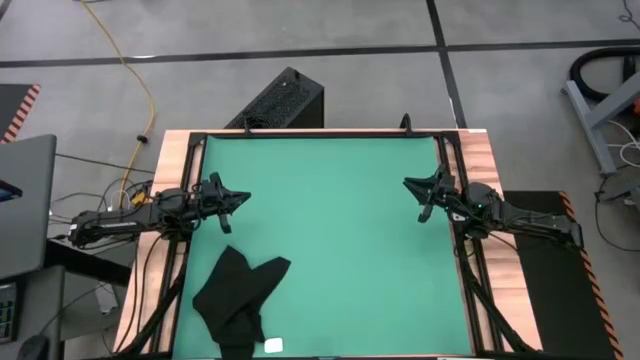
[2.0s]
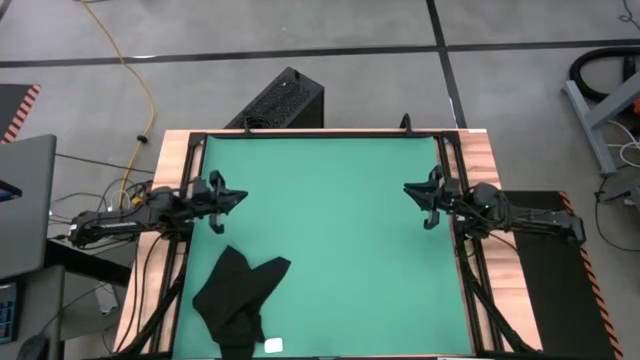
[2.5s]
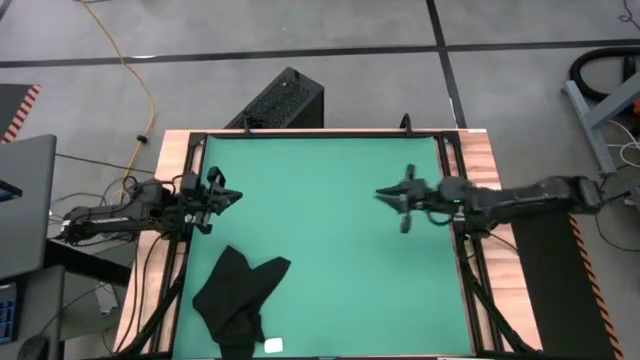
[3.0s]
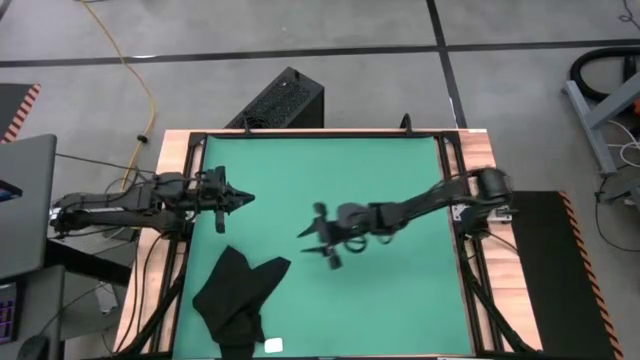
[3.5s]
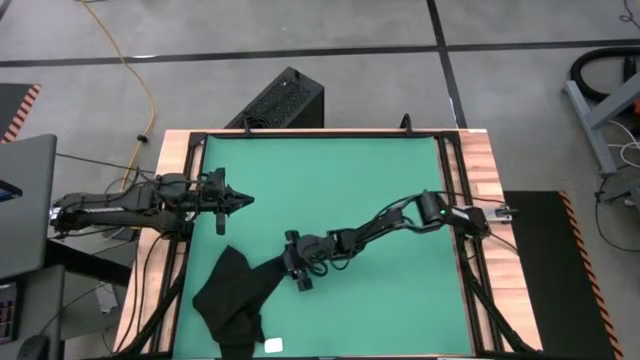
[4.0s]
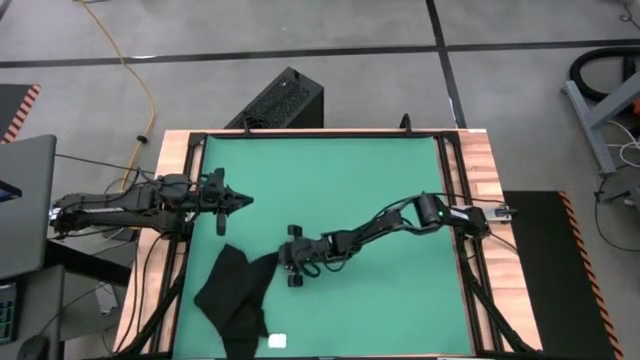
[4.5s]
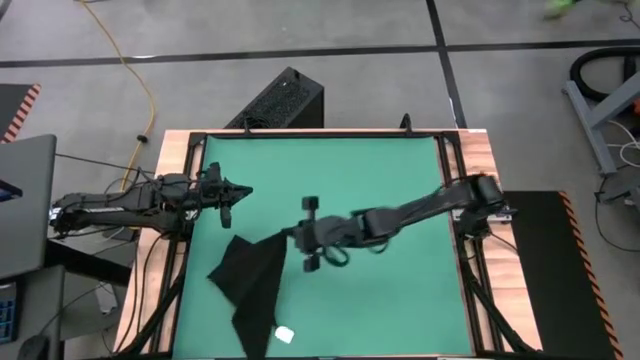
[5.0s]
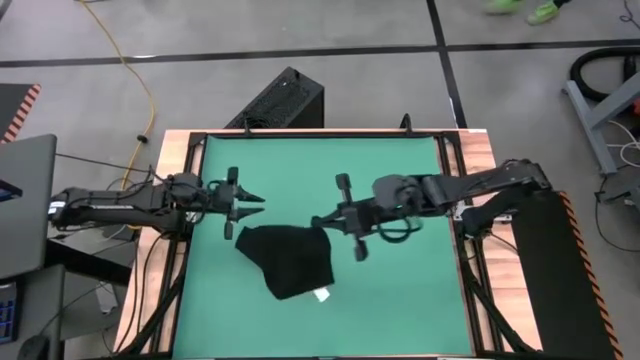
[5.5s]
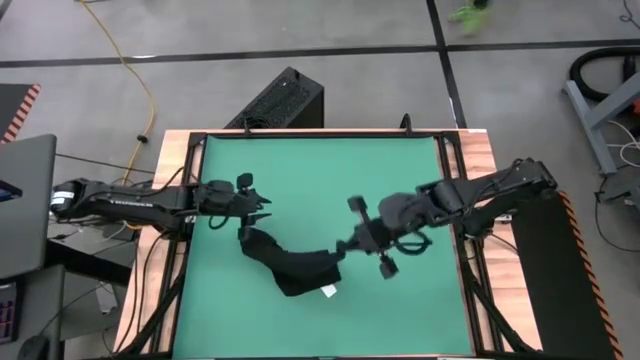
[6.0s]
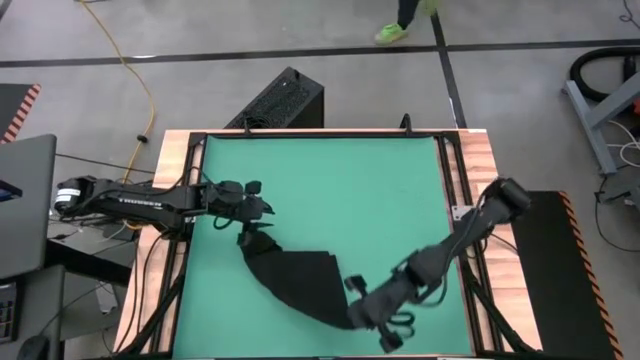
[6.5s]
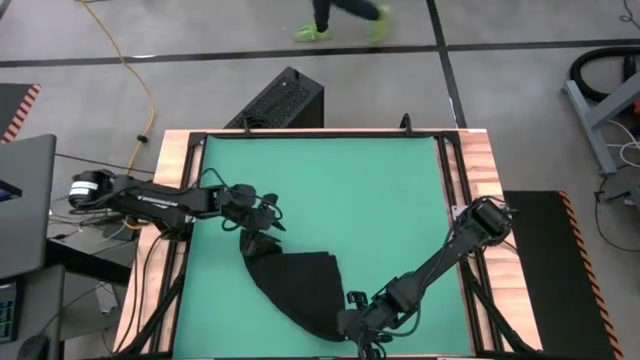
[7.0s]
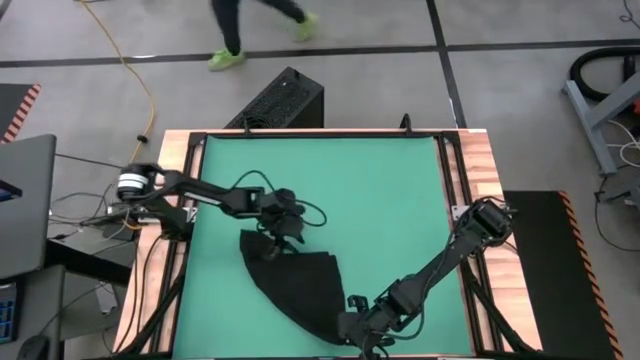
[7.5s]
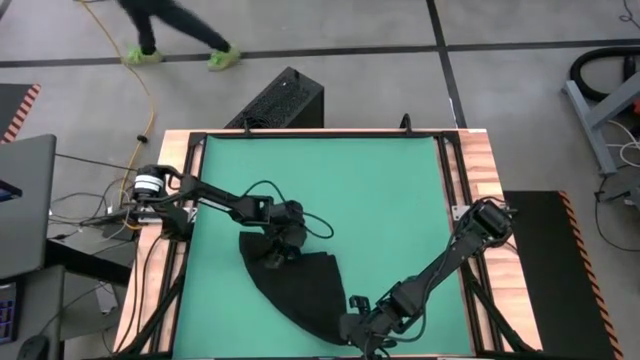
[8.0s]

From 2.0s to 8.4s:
Task: Roll towel
Roll the black towel

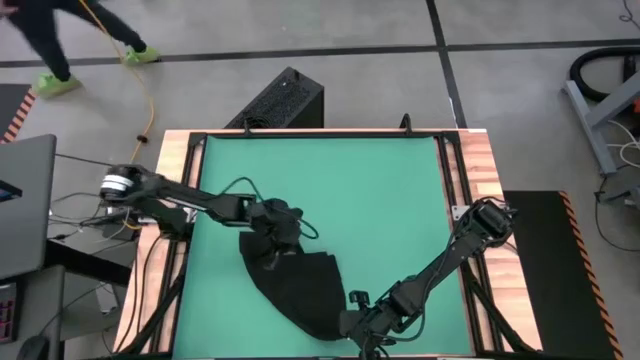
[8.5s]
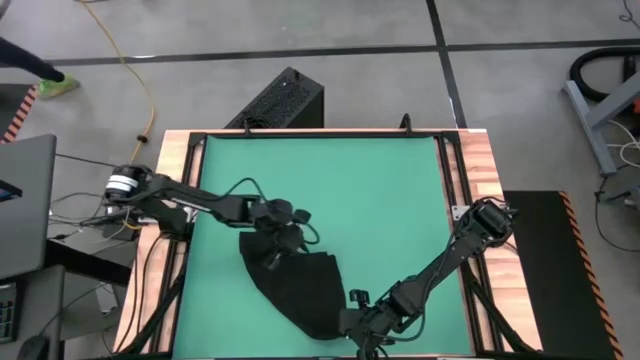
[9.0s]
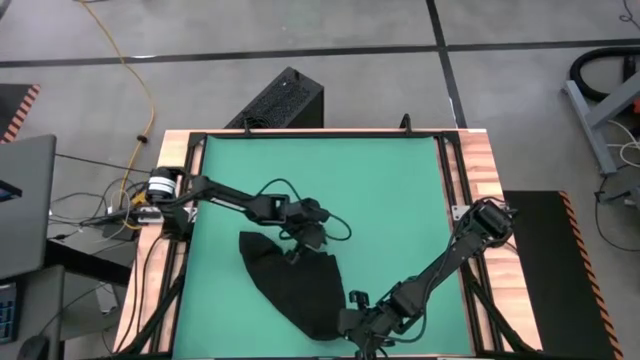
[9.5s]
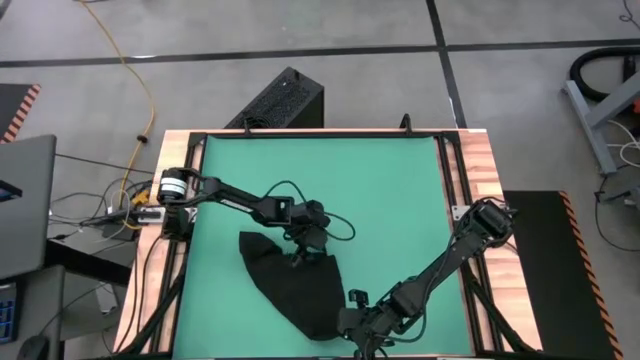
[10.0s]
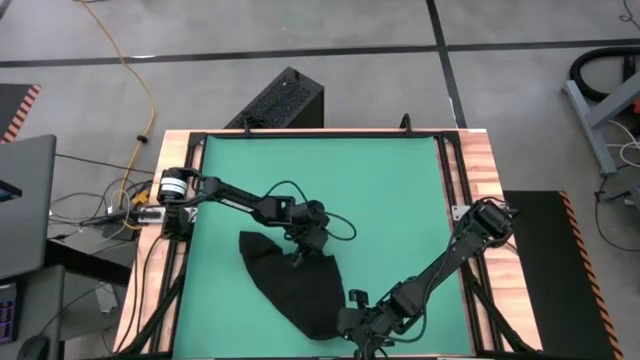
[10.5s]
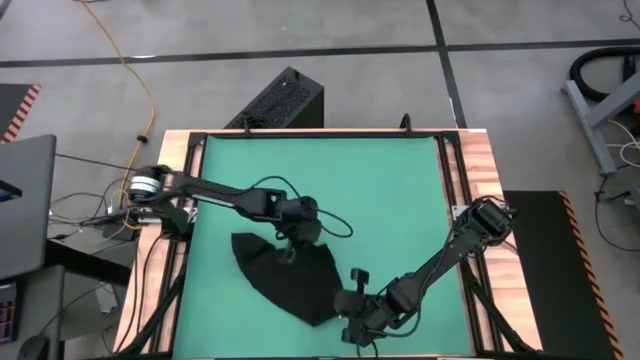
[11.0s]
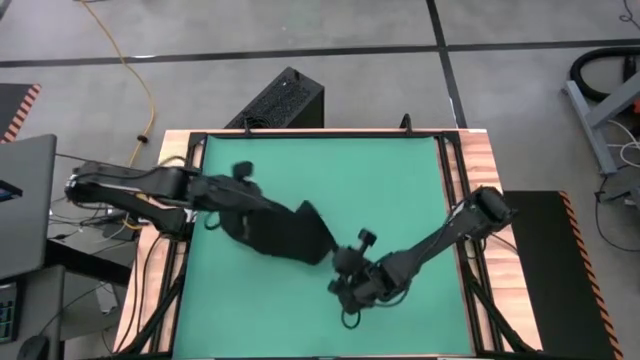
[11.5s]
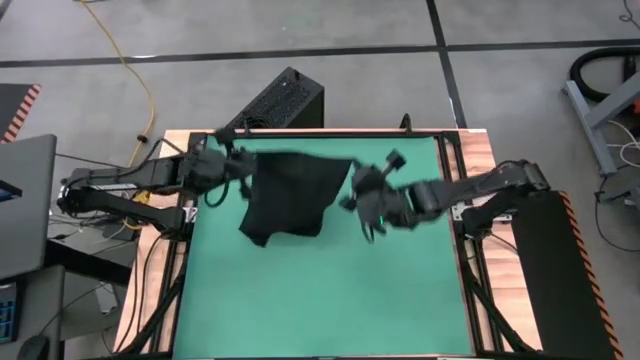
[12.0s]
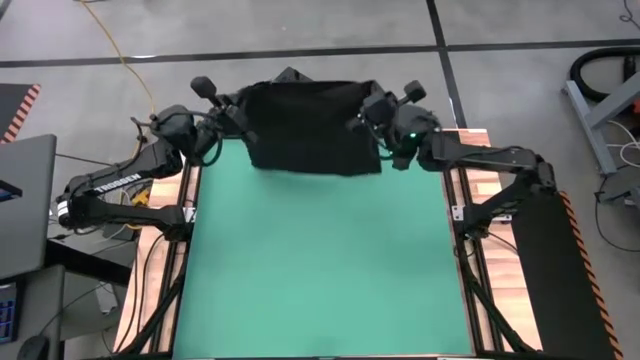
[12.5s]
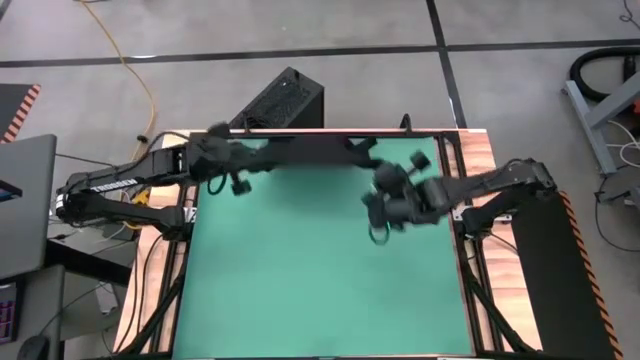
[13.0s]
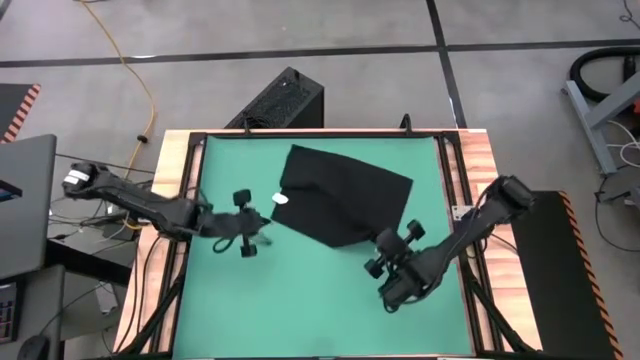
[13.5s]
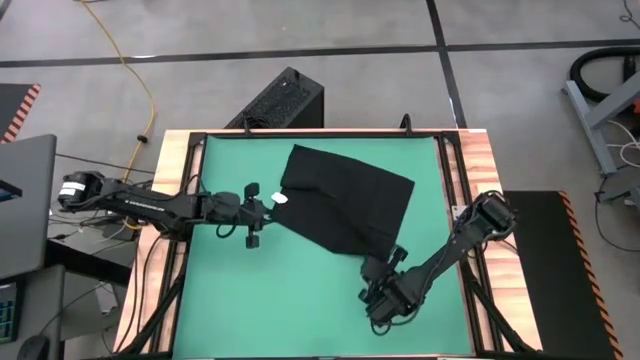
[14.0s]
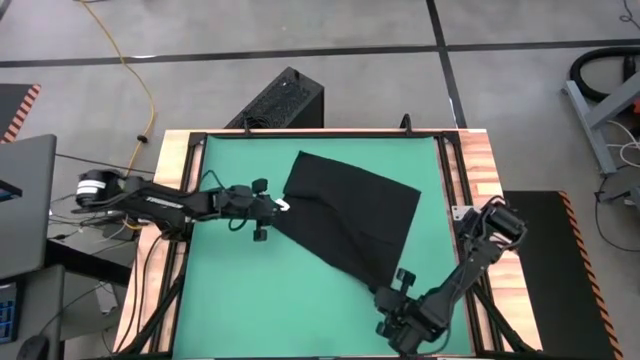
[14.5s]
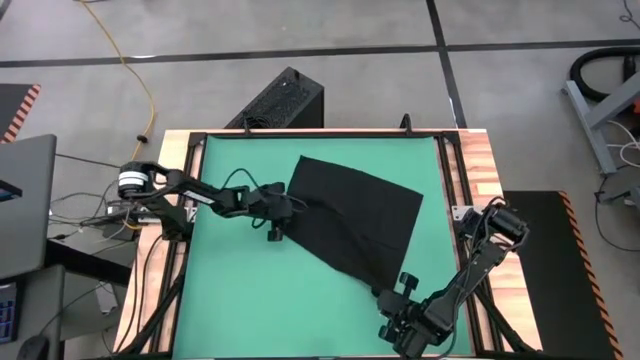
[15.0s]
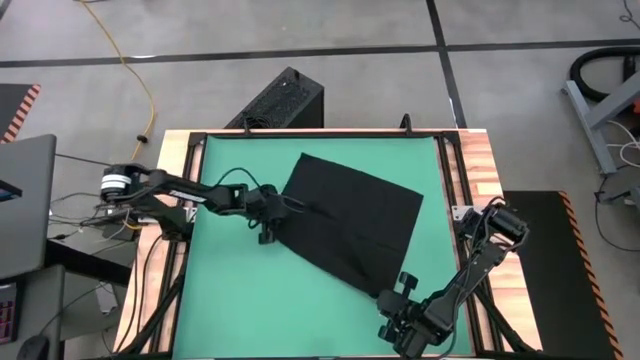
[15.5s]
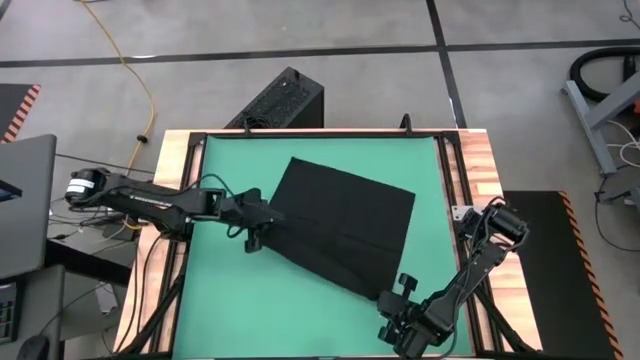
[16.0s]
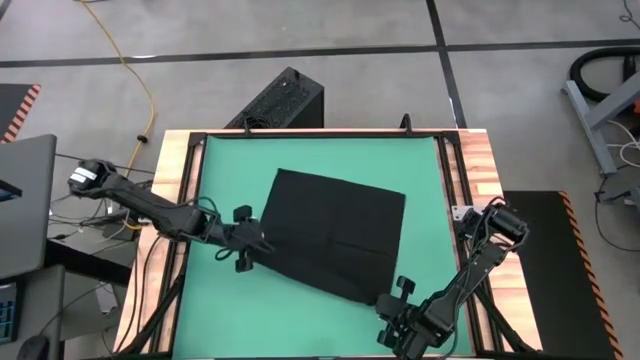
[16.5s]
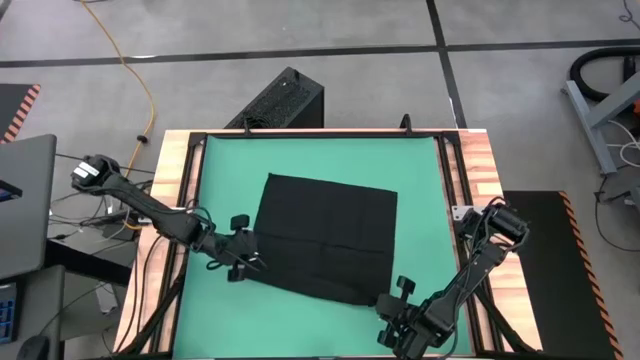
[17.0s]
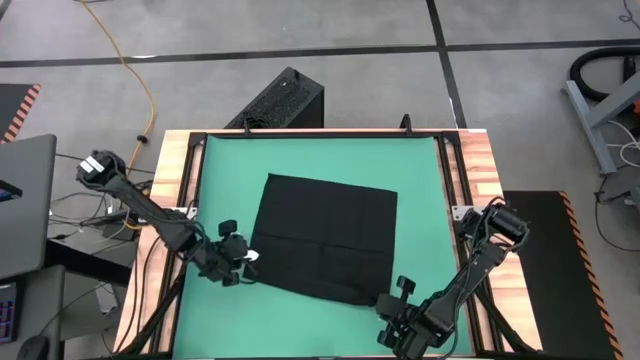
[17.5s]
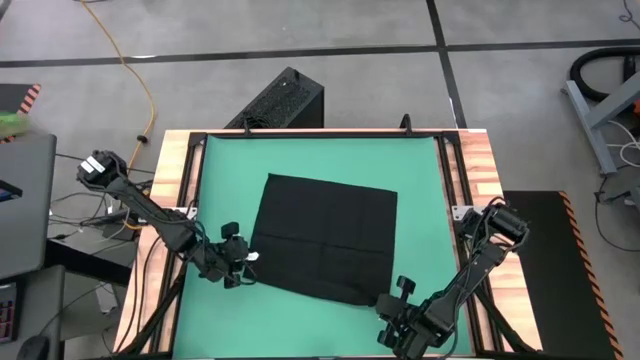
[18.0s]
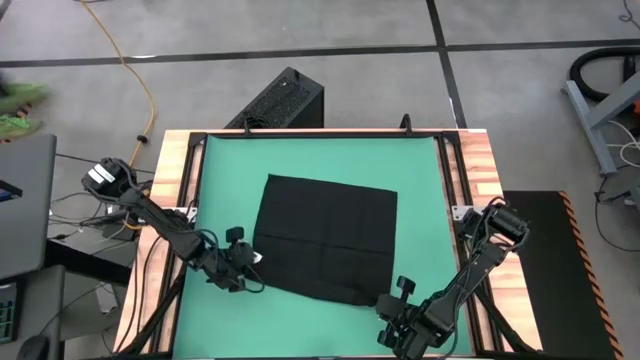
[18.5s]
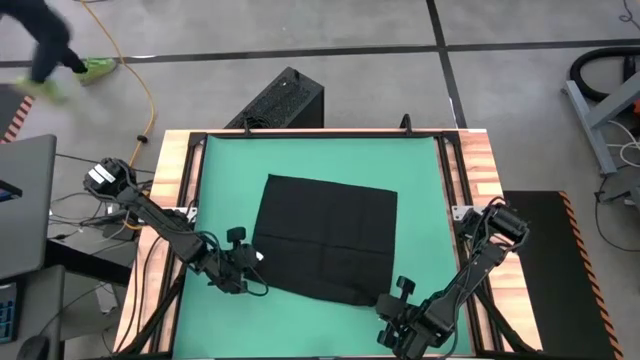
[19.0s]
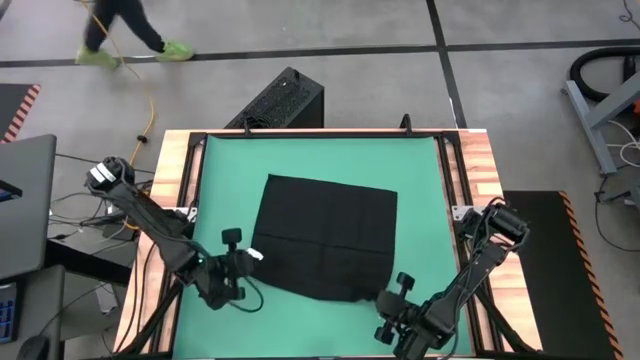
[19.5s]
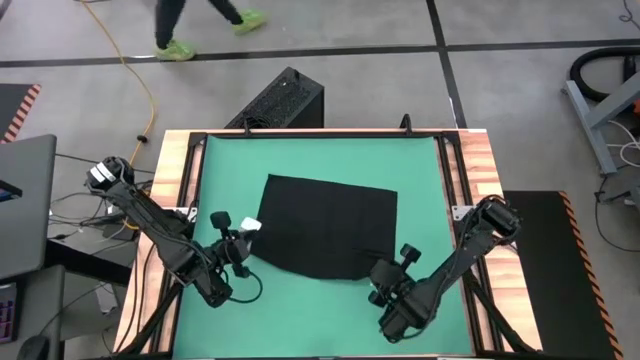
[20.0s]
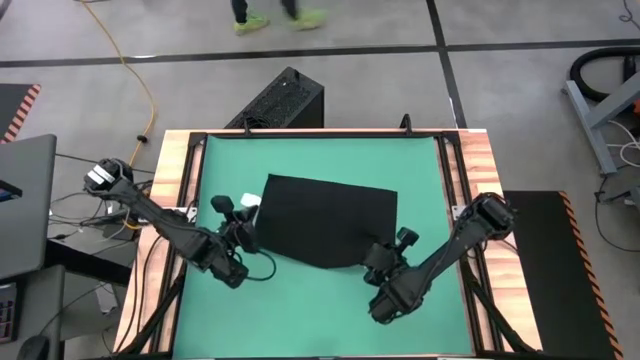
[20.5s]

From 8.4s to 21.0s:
Roll the black towel

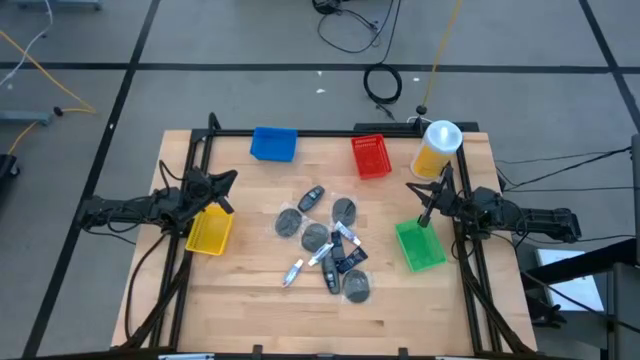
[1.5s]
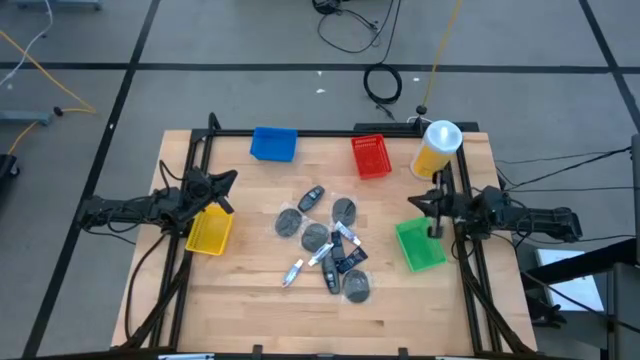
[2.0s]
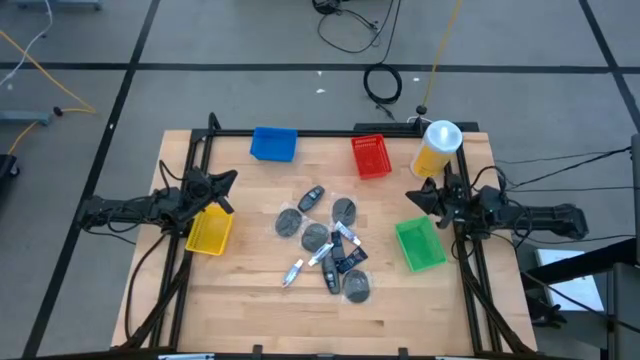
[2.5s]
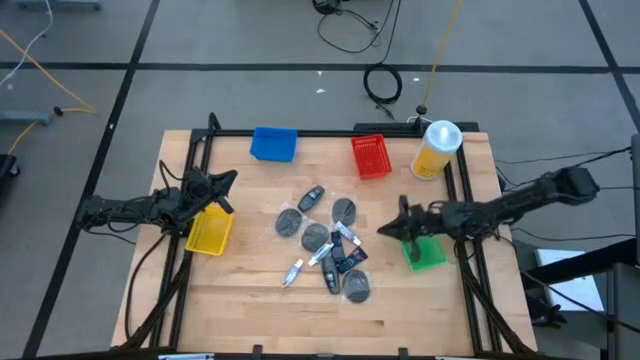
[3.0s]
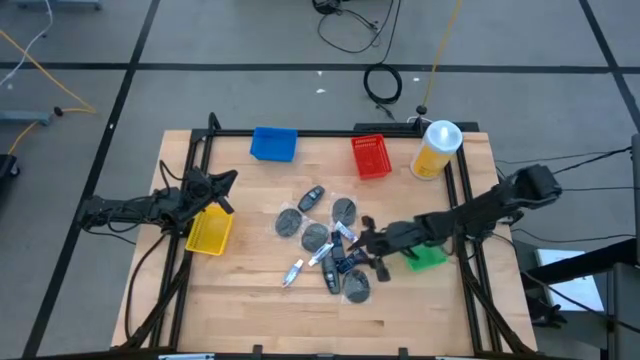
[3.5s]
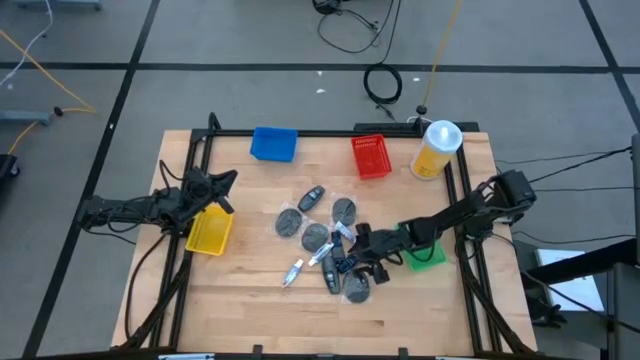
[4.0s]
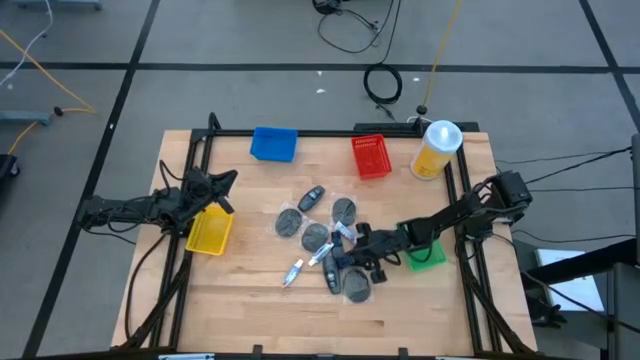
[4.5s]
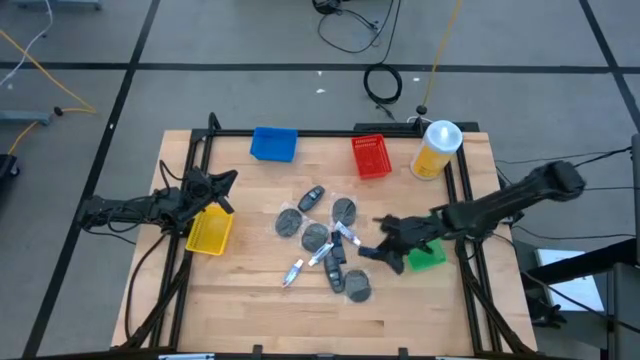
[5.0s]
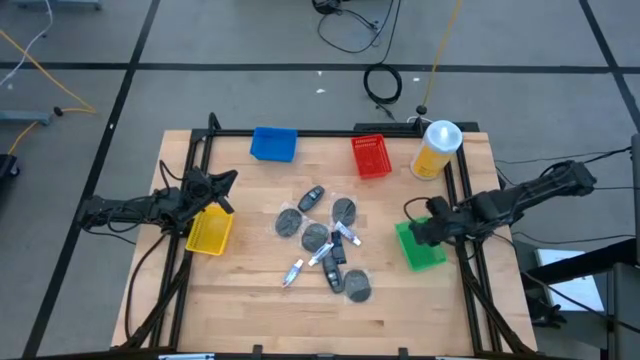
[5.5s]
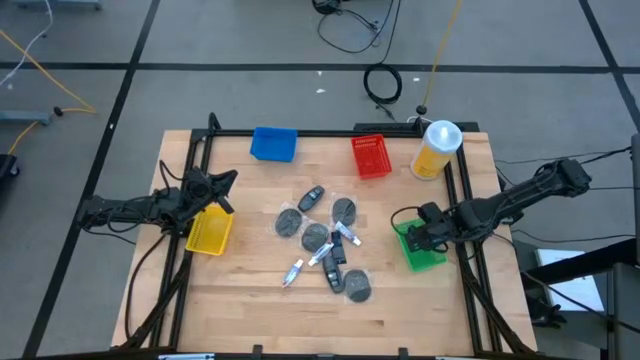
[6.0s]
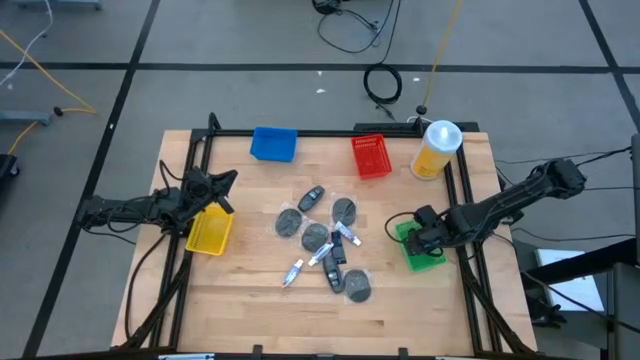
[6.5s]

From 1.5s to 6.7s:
Task: Pick & Place Travel size toiletries
Put the blue shave cream into the green bin
